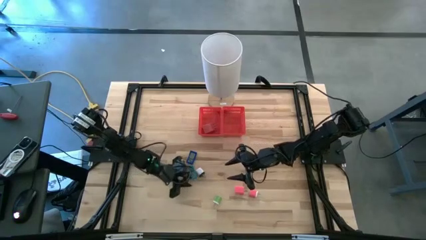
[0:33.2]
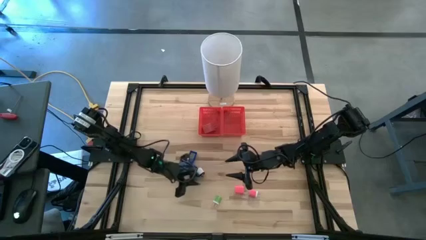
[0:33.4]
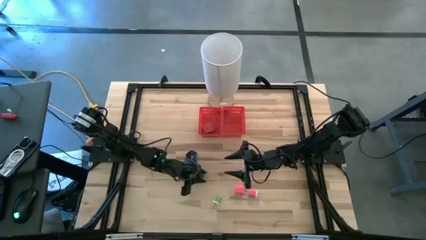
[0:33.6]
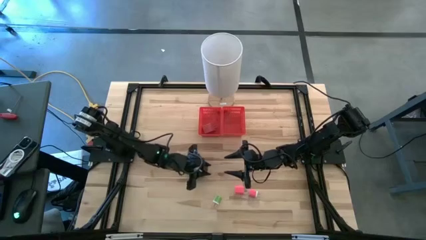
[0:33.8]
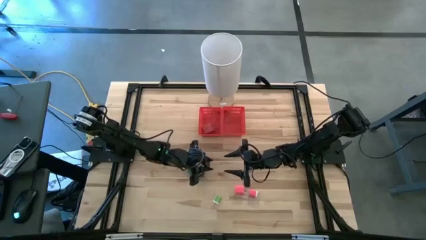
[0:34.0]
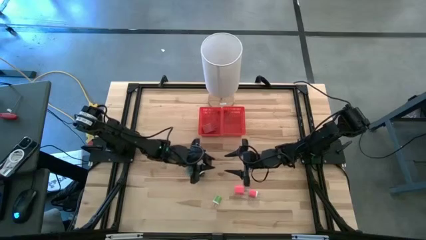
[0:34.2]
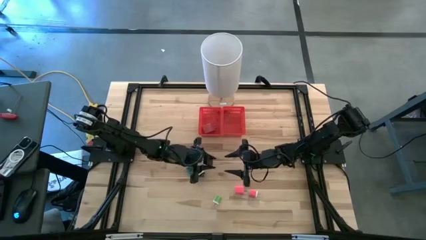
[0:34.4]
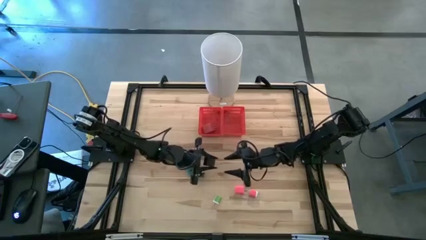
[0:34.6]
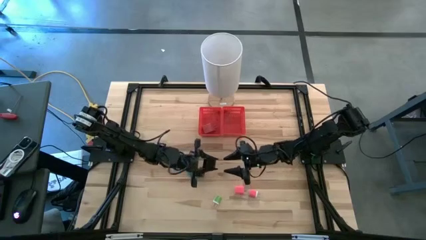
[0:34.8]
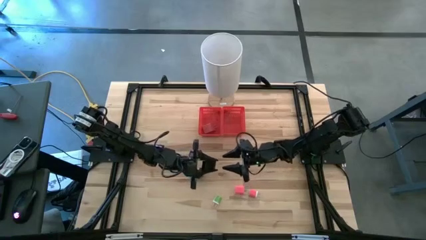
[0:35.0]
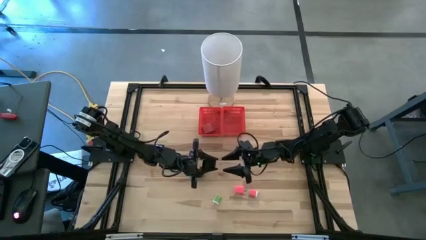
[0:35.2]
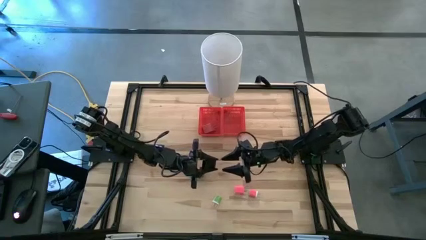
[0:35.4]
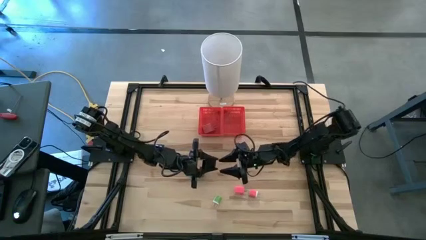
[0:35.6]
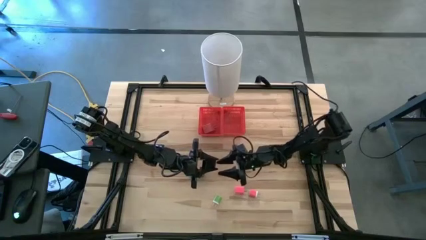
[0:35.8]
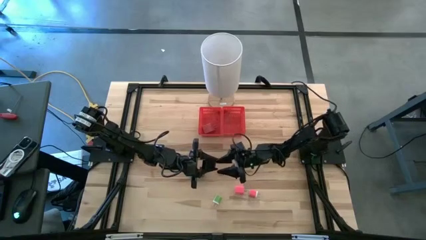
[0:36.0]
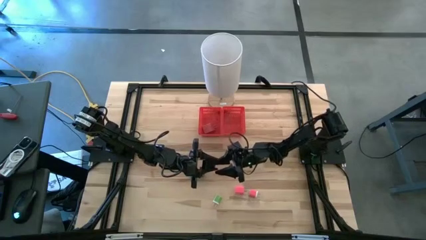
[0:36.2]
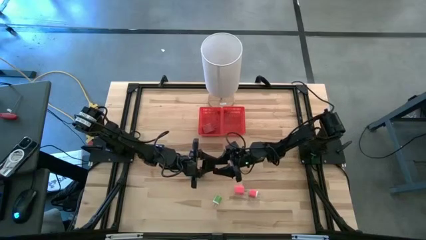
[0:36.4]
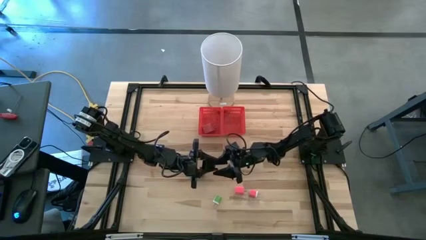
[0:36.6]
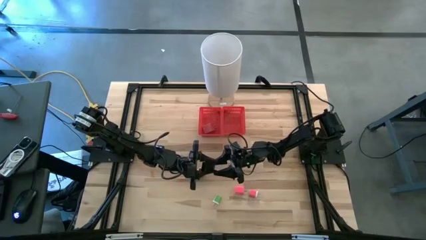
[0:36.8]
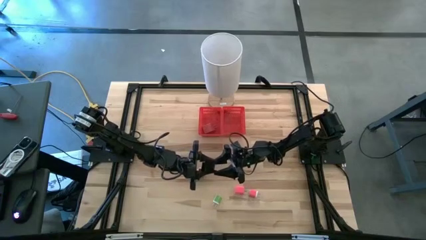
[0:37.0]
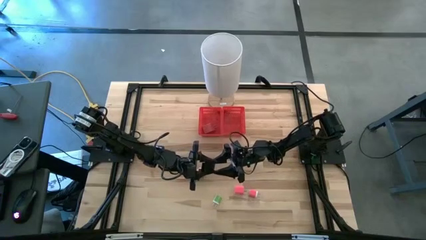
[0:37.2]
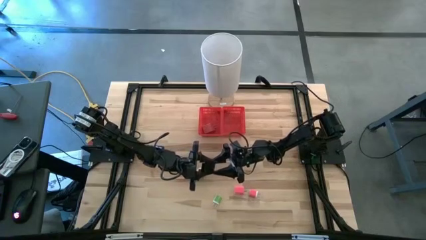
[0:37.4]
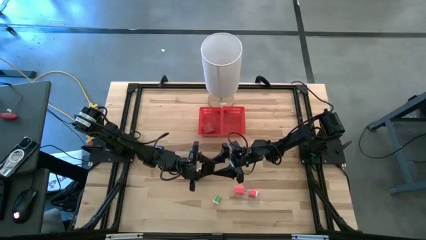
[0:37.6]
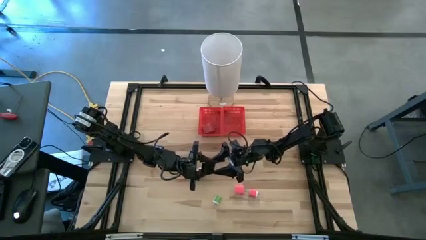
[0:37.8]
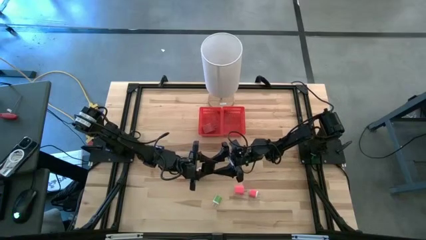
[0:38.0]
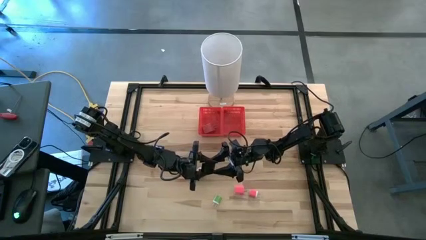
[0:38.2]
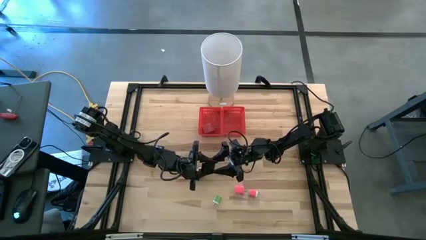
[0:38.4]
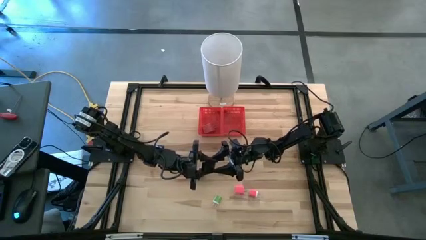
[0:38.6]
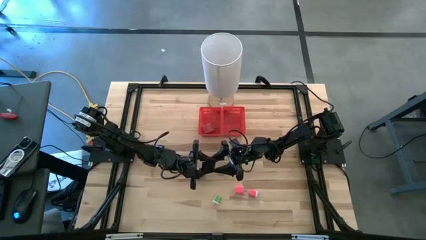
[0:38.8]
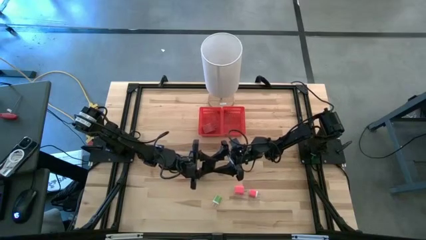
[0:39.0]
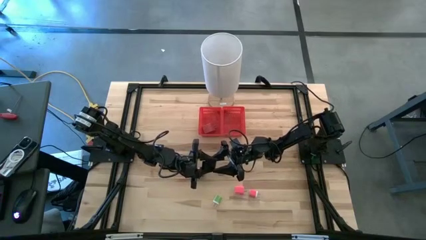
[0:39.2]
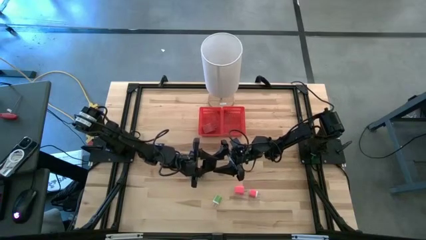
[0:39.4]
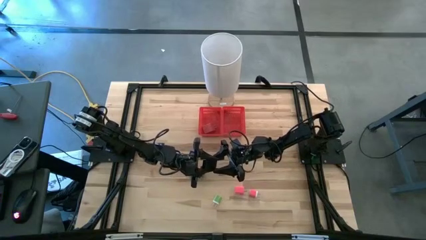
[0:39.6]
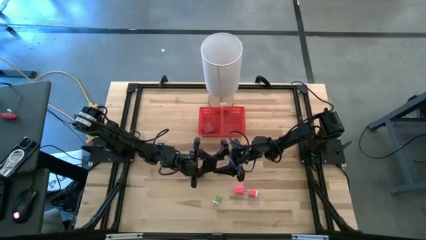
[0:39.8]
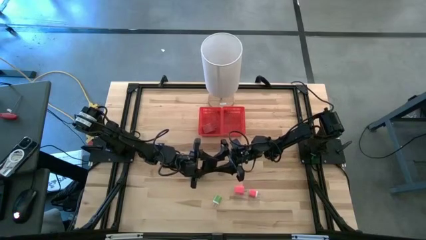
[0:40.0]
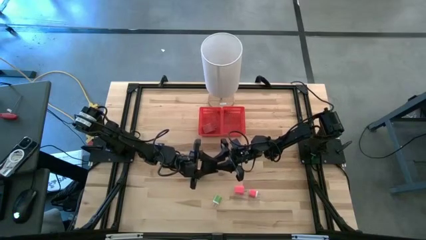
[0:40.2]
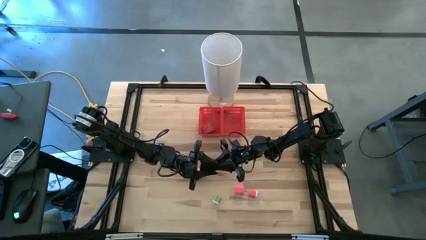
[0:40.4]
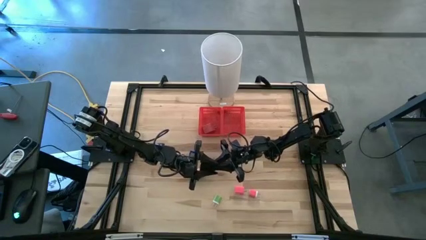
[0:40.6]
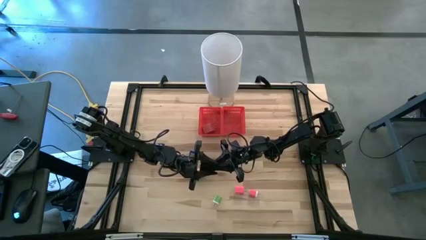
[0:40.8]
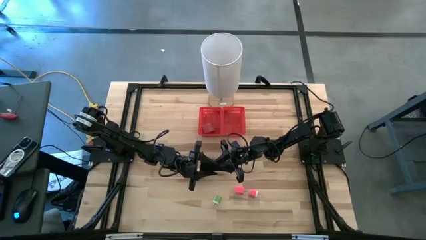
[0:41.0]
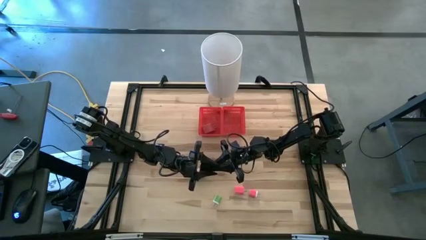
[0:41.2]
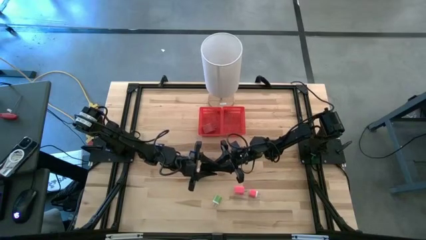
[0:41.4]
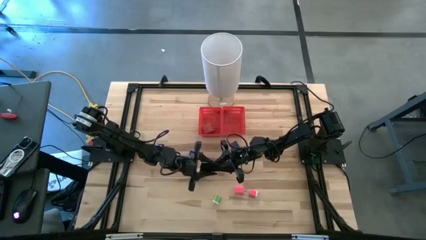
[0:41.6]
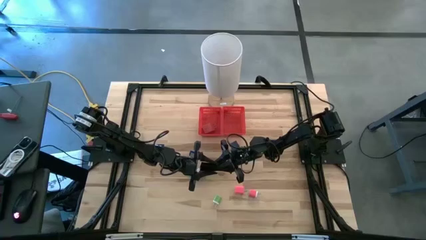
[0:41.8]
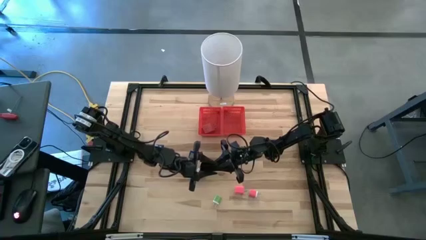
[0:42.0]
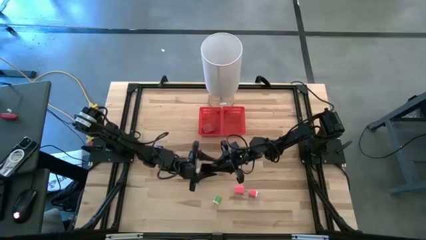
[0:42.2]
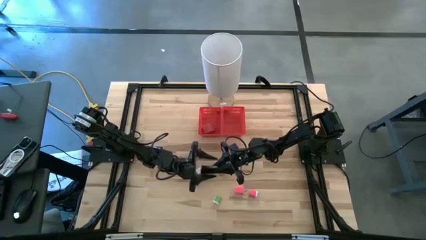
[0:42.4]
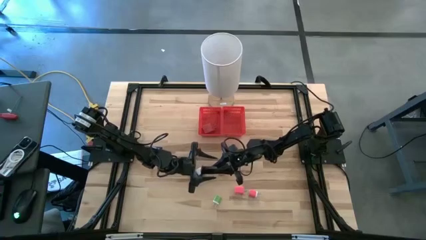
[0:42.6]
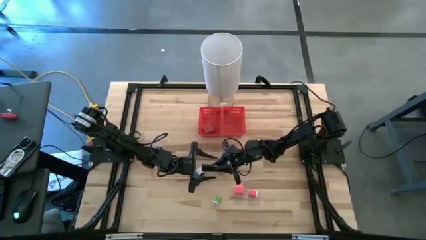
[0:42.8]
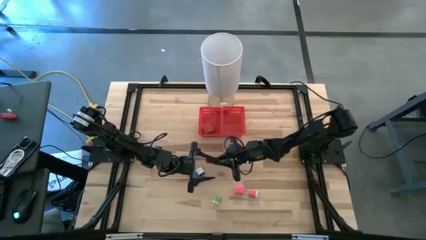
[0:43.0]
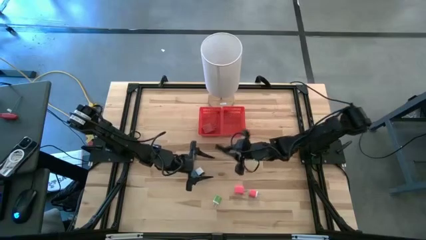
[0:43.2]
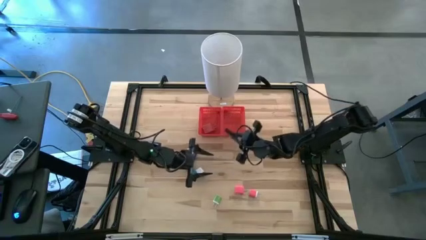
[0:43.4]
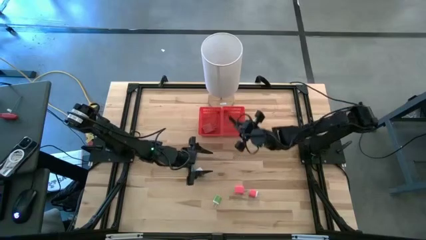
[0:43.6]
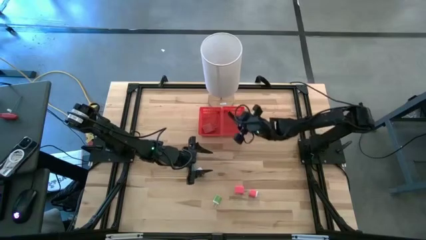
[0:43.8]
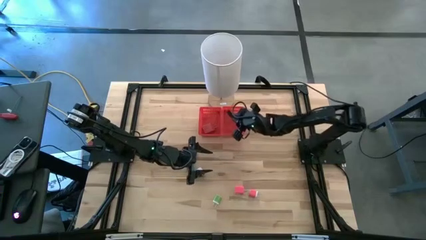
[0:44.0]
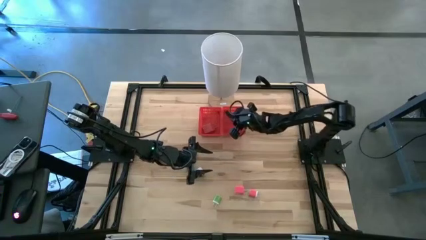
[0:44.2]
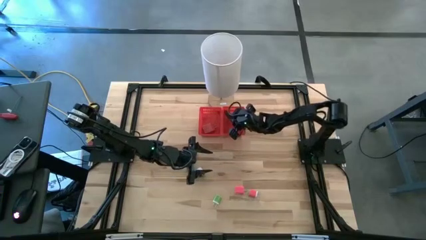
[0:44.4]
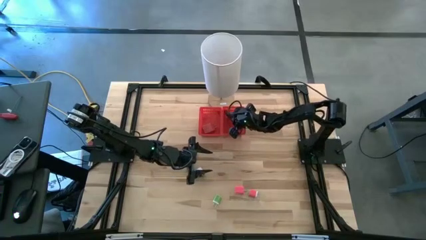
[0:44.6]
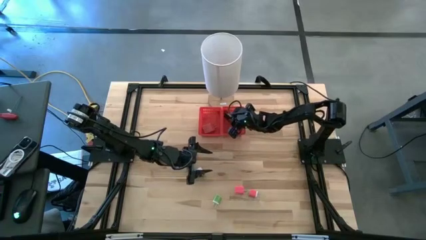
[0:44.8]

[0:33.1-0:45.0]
Task: Pick & Place Office items
Put the black digital clock into the right red bin

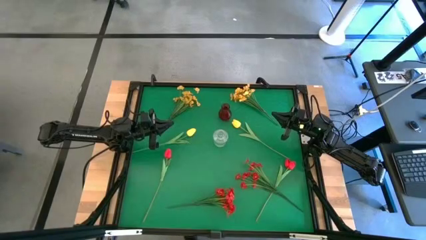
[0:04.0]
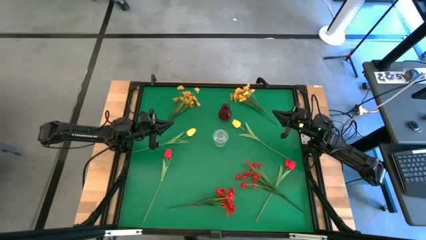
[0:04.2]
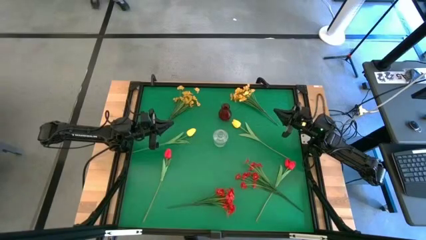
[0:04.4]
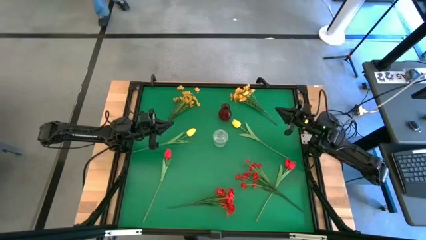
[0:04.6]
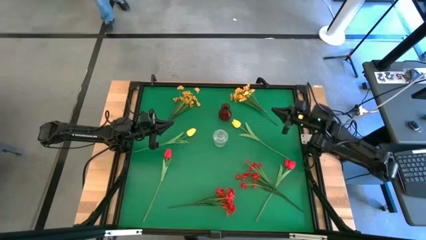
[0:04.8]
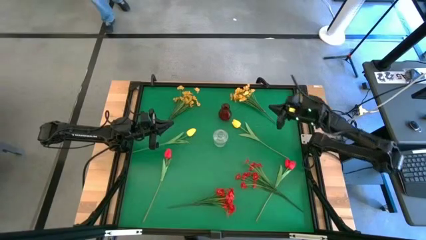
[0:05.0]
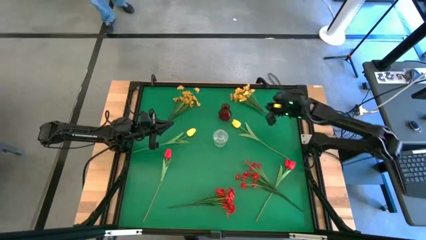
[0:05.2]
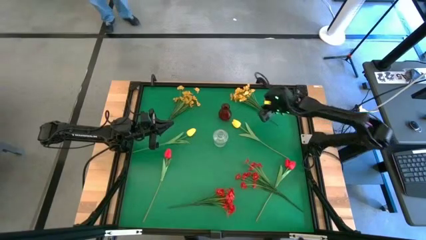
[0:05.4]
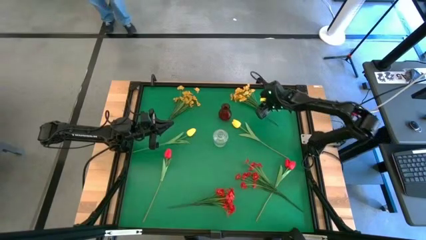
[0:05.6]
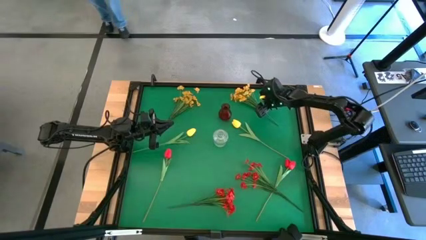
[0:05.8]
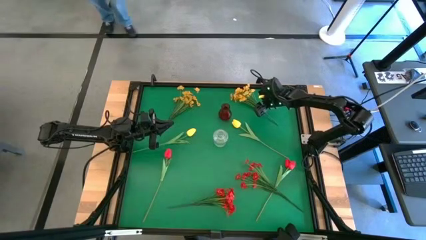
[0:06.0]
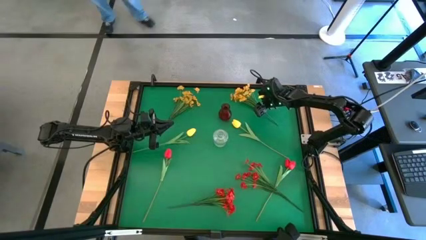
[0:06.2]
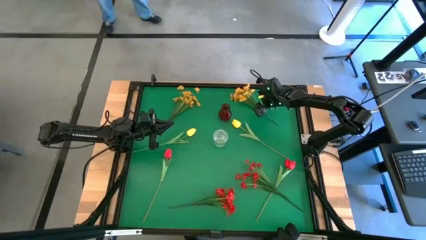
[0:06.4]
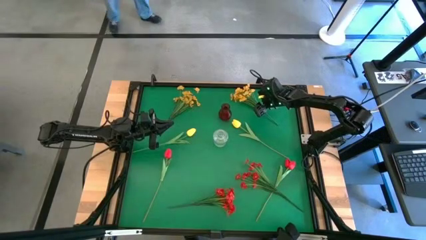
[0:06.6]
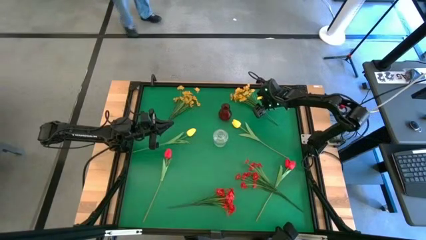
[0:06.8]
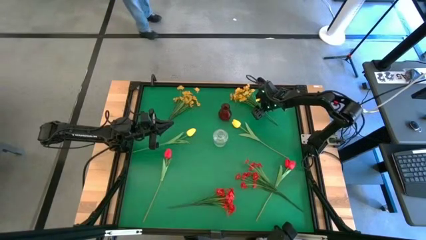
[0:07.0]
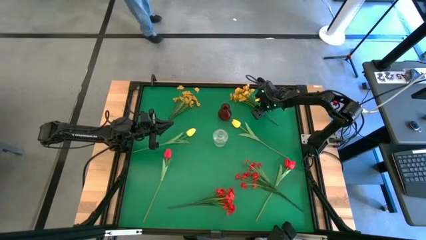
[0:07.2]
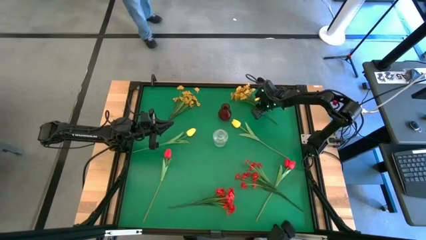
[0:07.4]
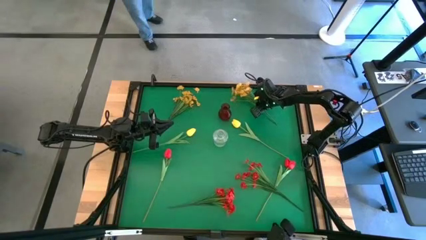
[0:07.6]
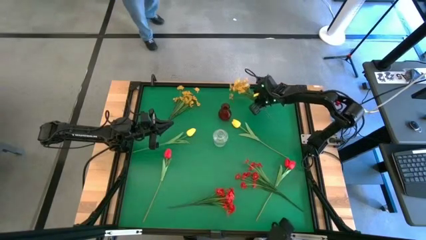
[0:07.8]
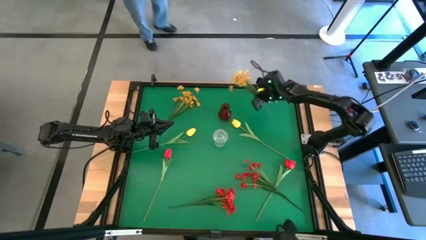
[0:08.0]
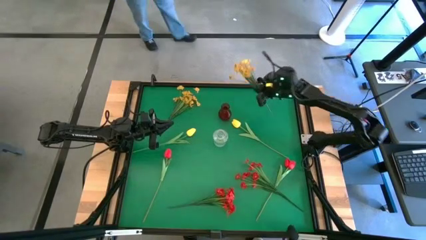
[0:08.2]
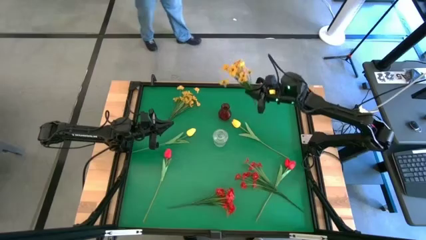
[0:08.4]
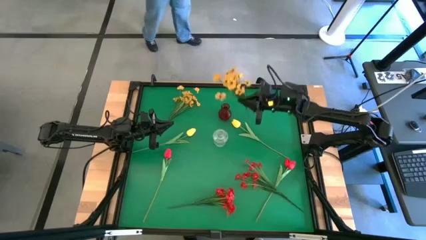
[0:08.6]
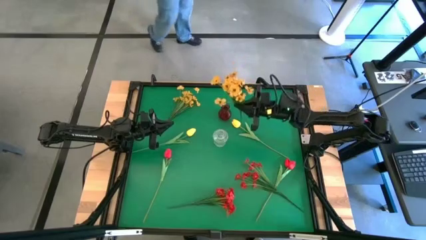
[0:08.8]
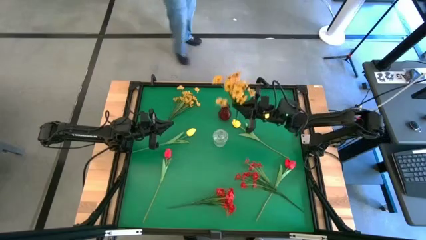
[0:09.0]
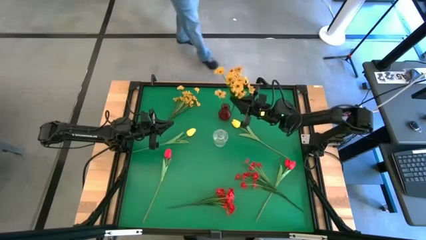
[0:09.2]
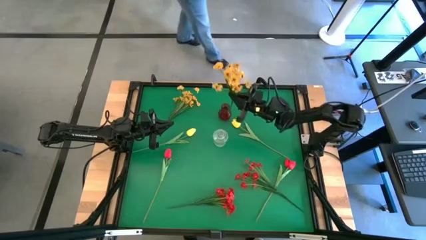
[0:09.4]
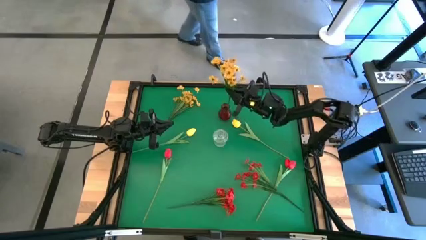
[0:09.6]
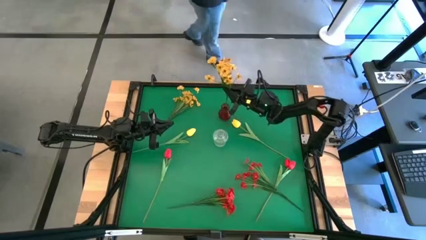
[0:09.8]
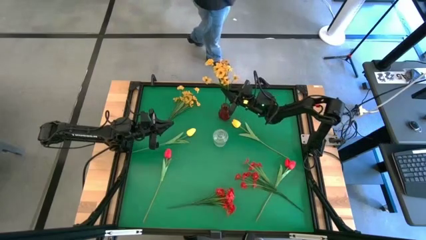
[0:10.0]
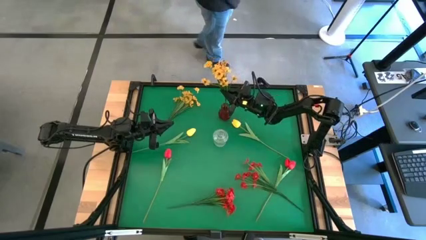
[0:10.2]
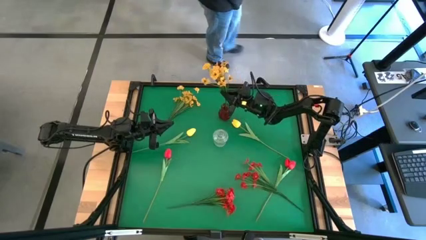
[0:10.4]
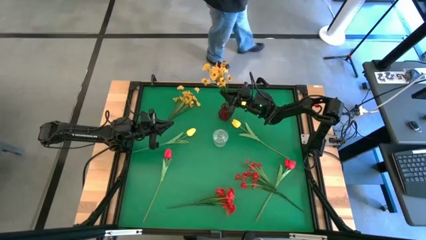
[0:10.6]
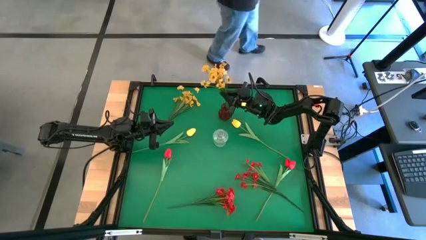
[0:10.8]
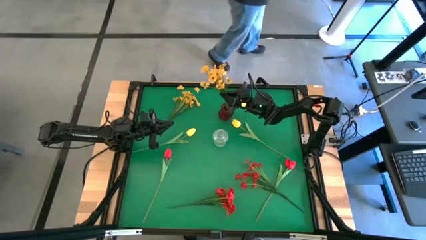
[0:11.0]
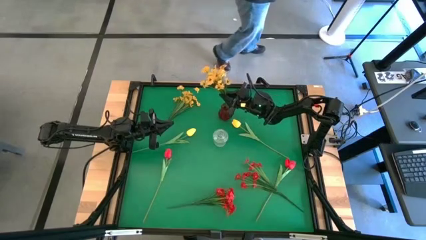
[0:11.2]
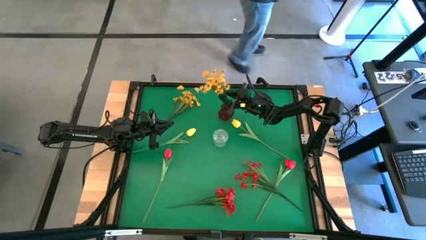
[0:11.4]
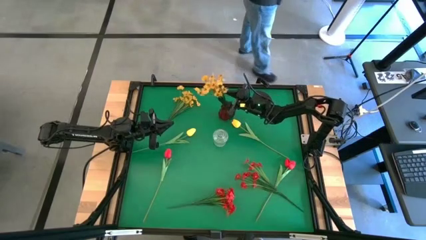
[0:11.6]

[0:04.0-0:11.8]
Task: Sort flowers into vase by color
Put the yellow flowers into the red vase
